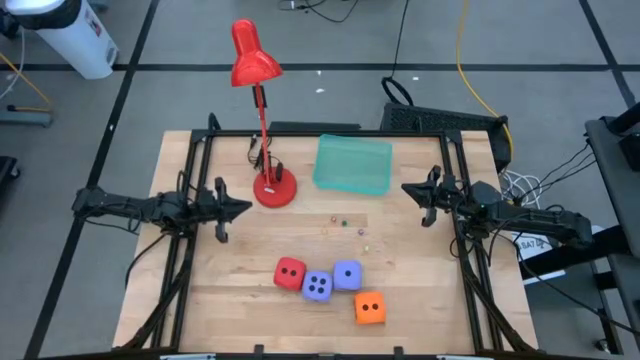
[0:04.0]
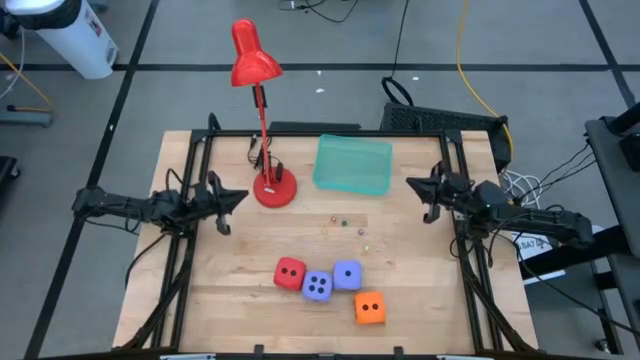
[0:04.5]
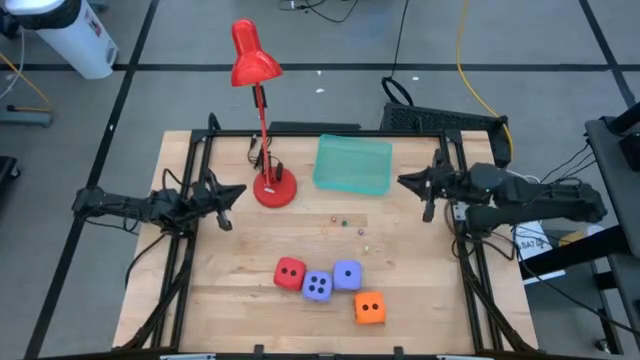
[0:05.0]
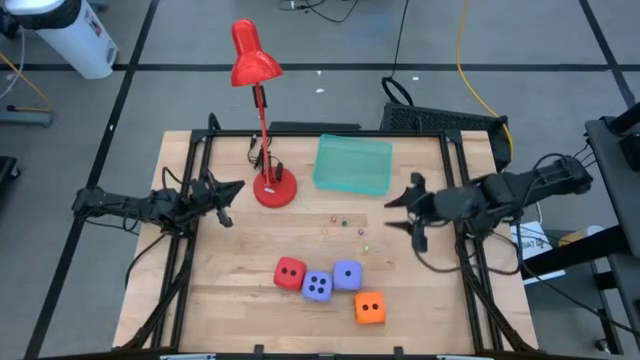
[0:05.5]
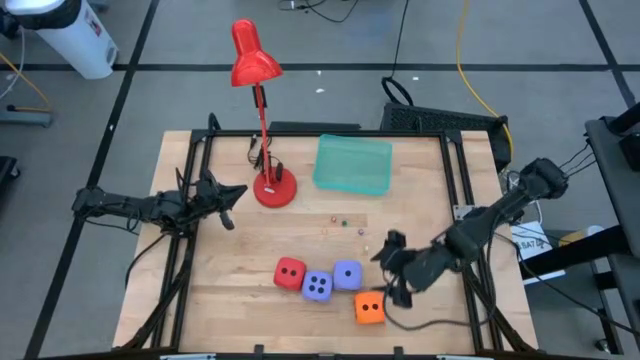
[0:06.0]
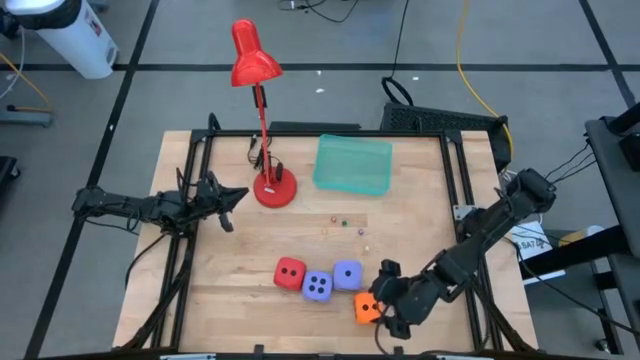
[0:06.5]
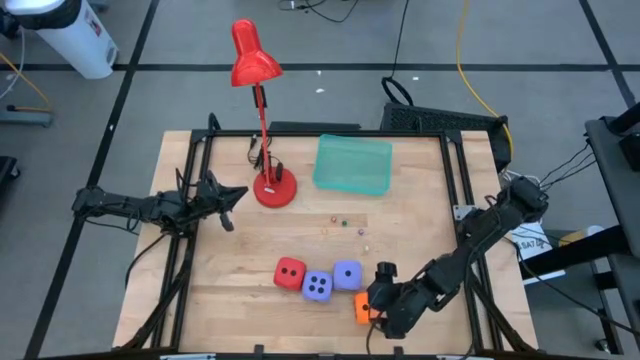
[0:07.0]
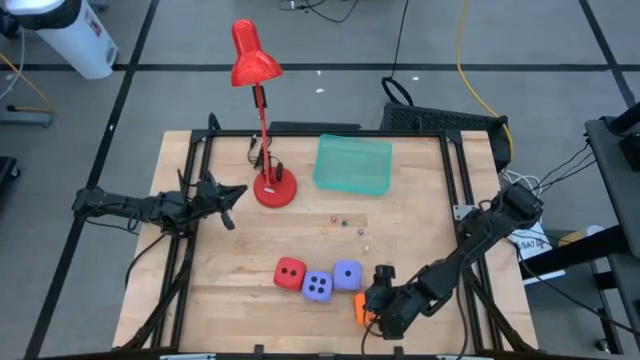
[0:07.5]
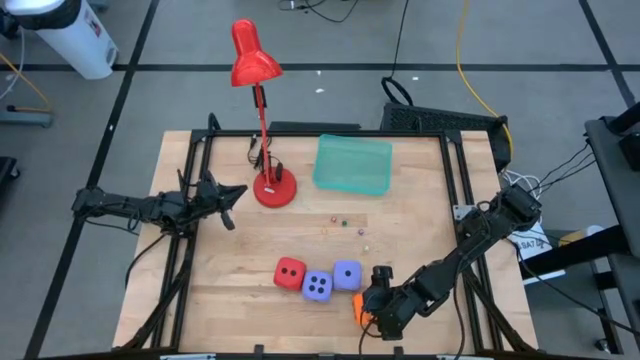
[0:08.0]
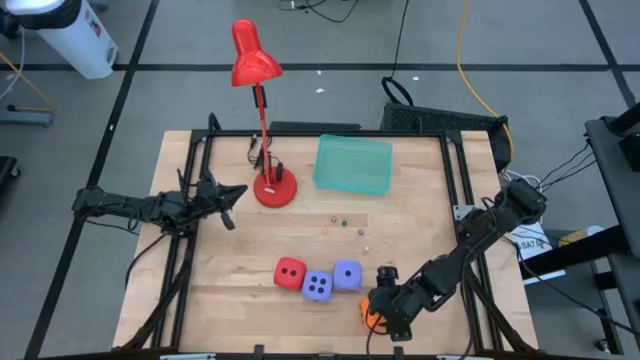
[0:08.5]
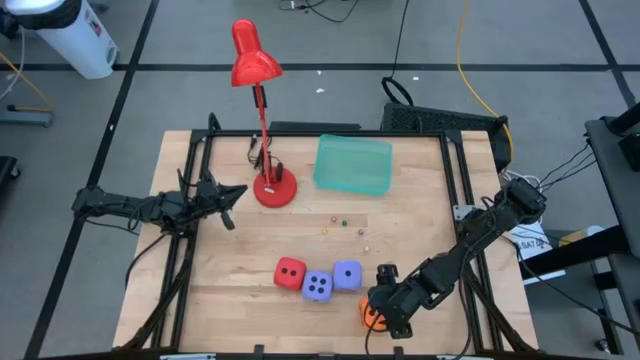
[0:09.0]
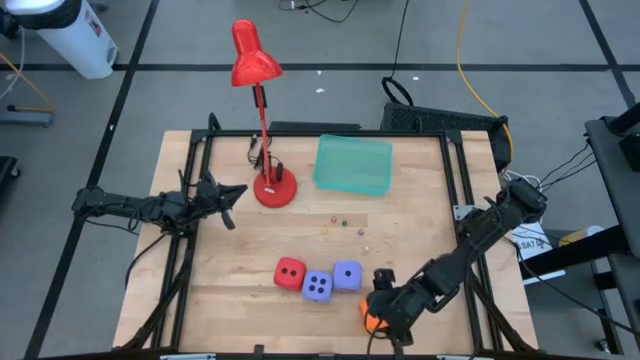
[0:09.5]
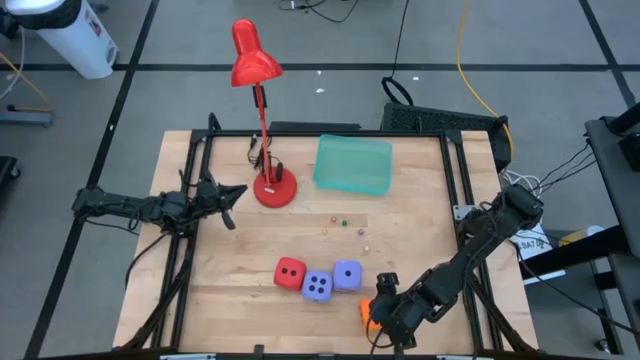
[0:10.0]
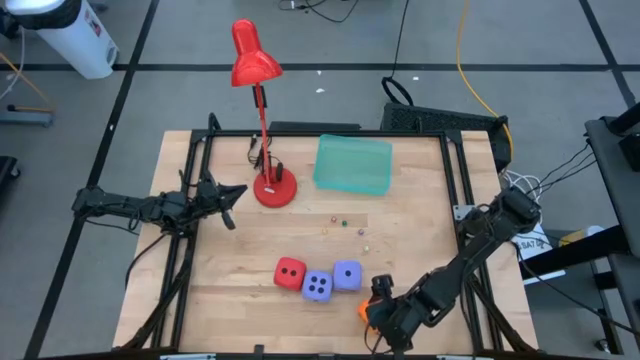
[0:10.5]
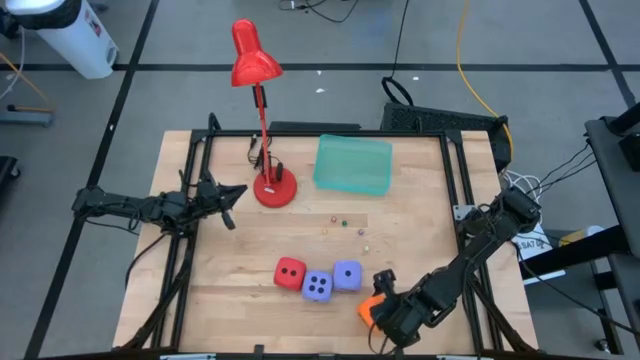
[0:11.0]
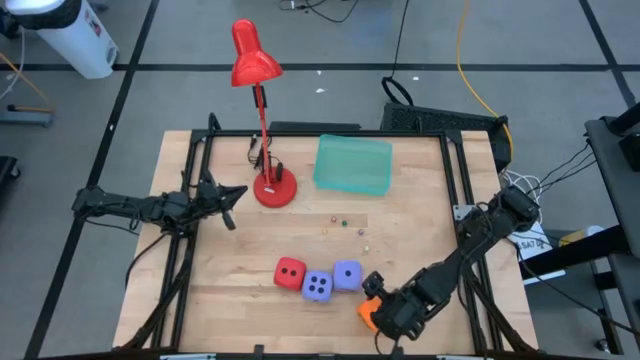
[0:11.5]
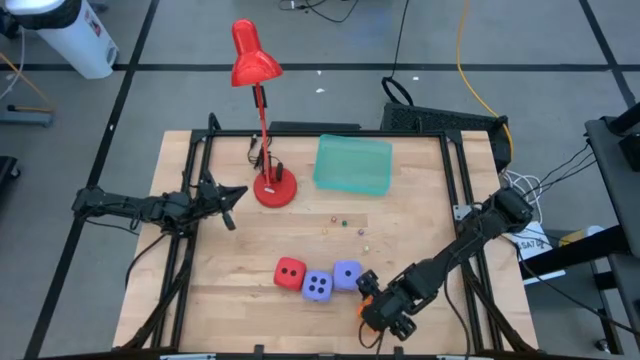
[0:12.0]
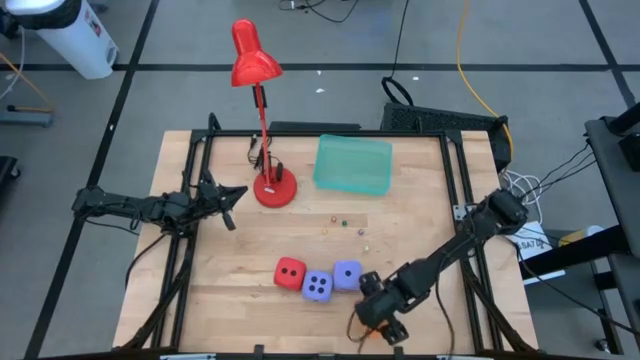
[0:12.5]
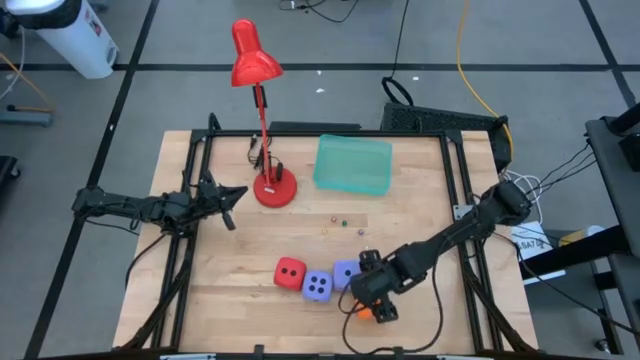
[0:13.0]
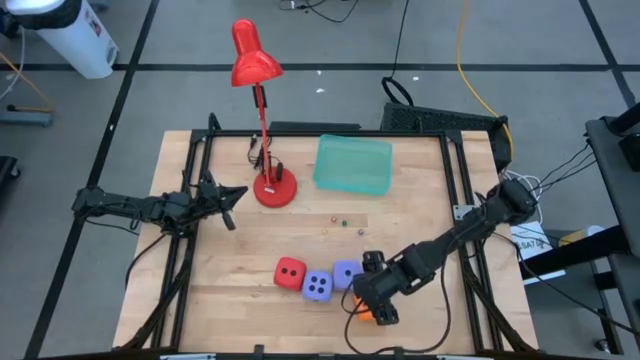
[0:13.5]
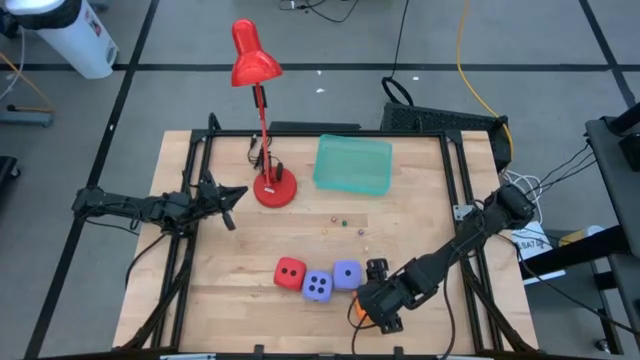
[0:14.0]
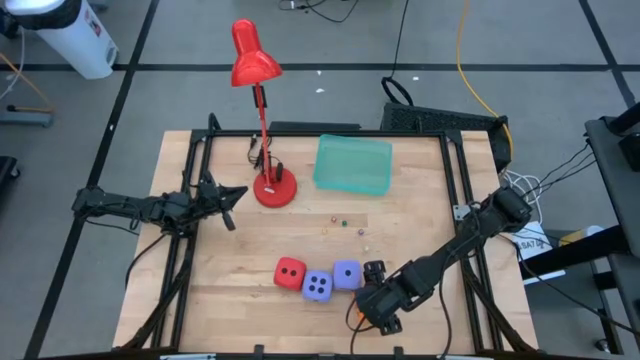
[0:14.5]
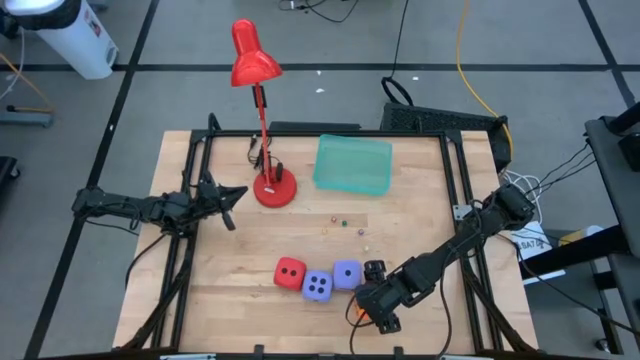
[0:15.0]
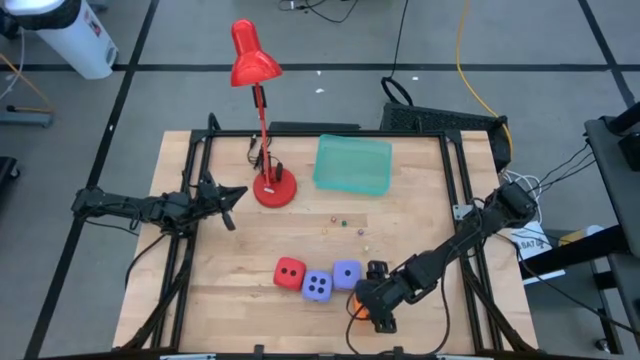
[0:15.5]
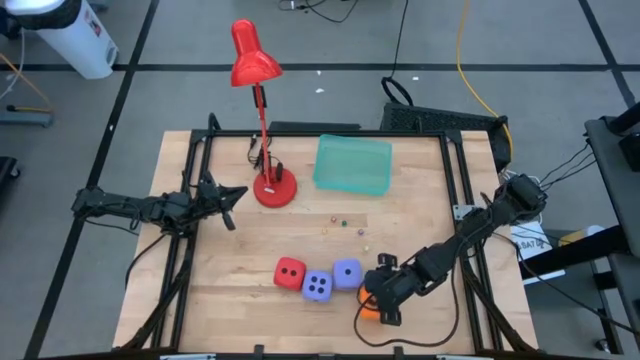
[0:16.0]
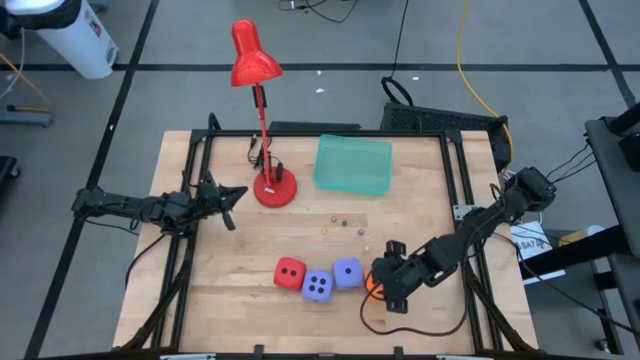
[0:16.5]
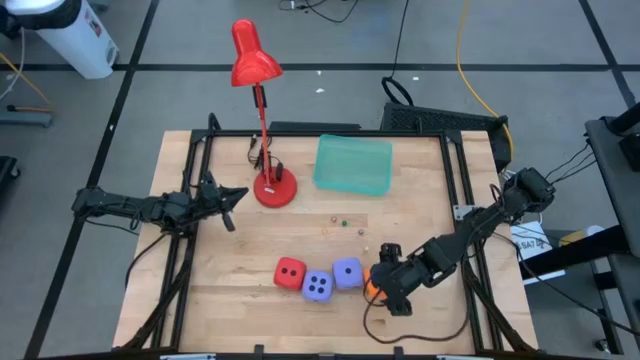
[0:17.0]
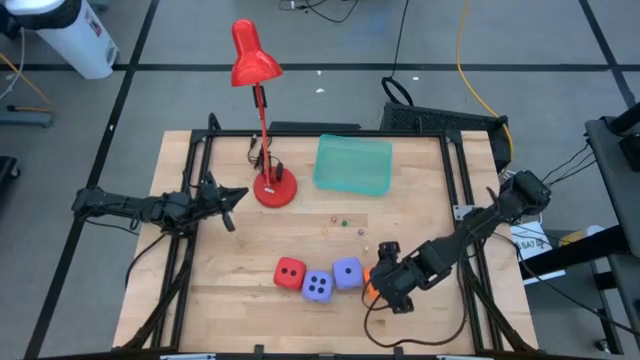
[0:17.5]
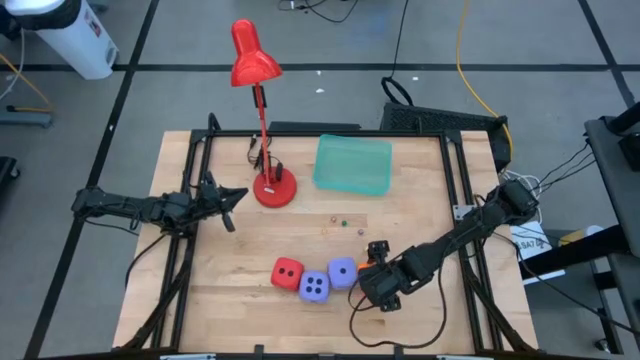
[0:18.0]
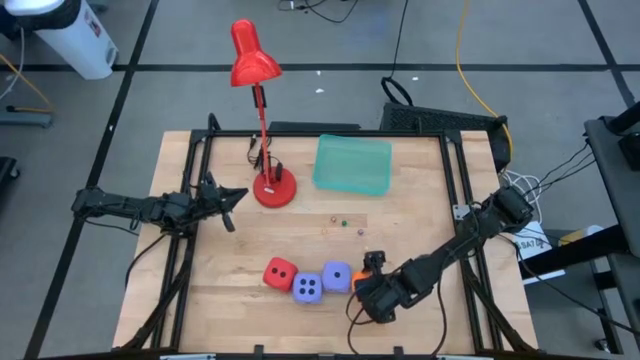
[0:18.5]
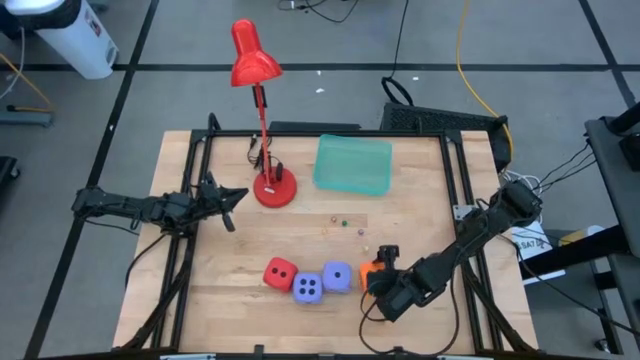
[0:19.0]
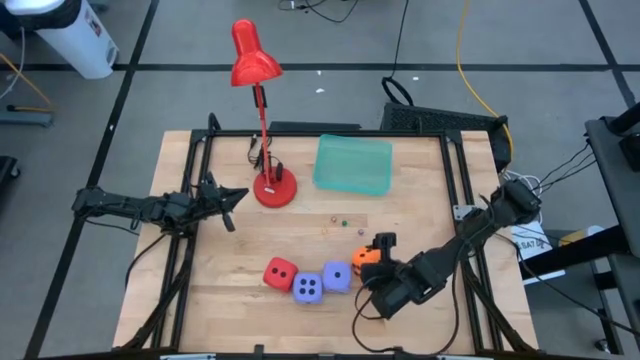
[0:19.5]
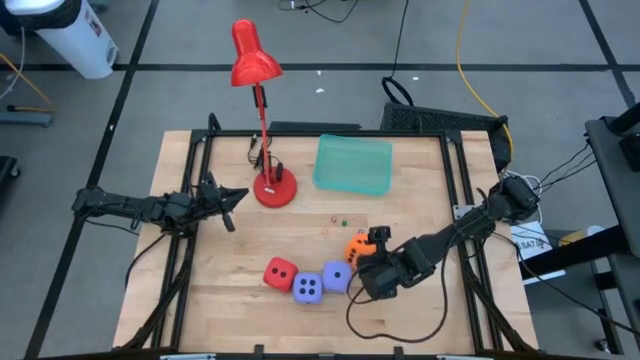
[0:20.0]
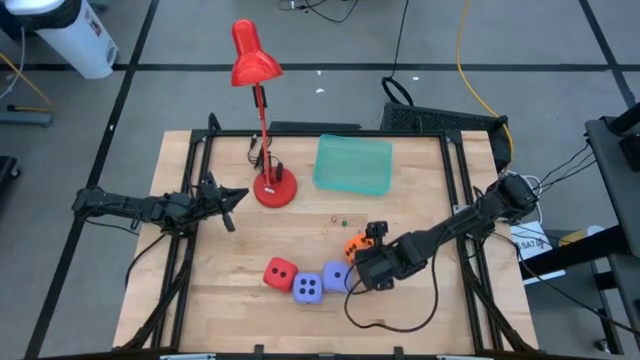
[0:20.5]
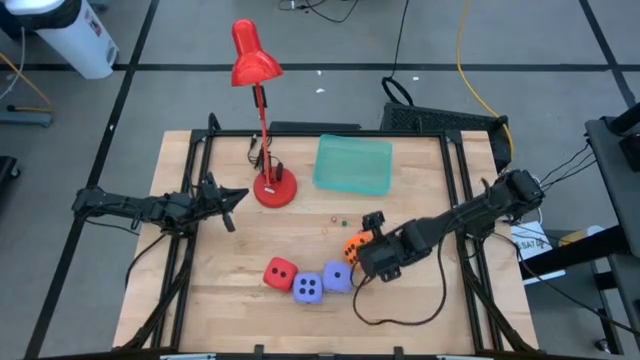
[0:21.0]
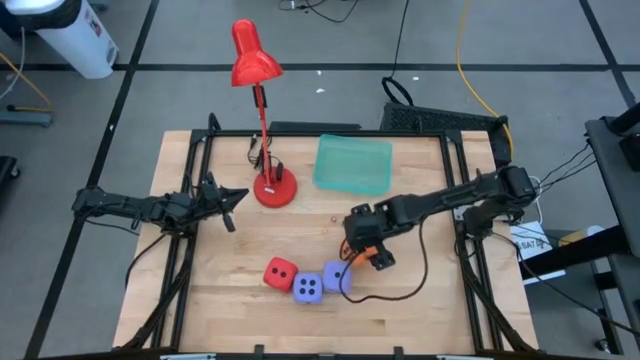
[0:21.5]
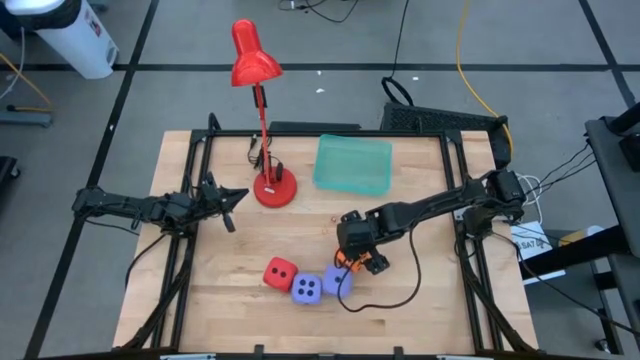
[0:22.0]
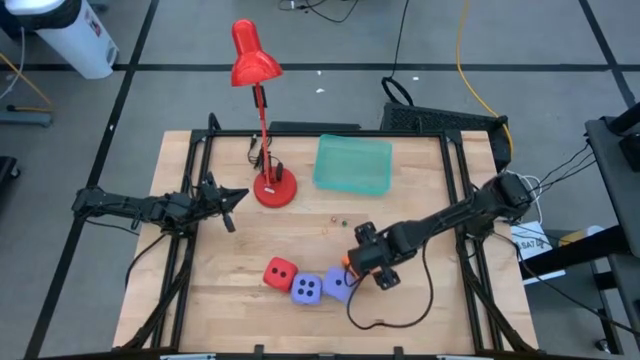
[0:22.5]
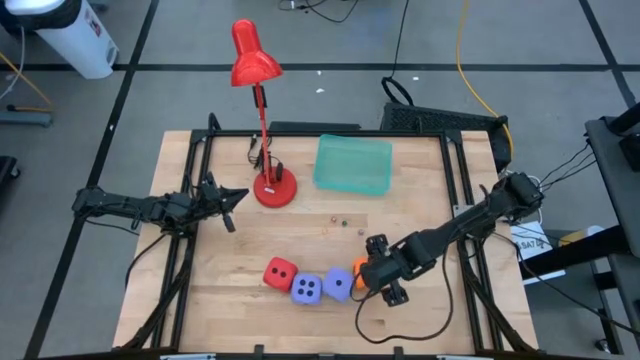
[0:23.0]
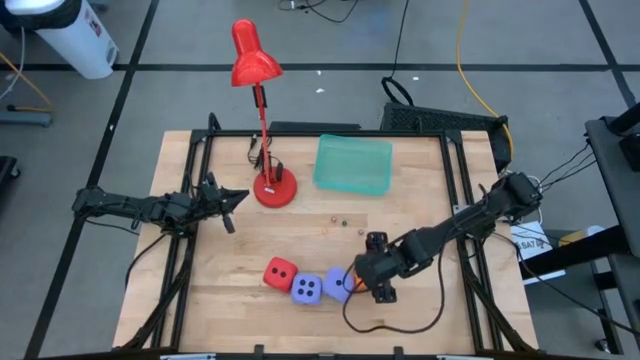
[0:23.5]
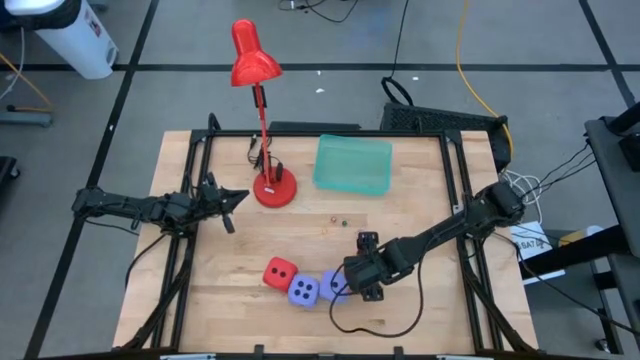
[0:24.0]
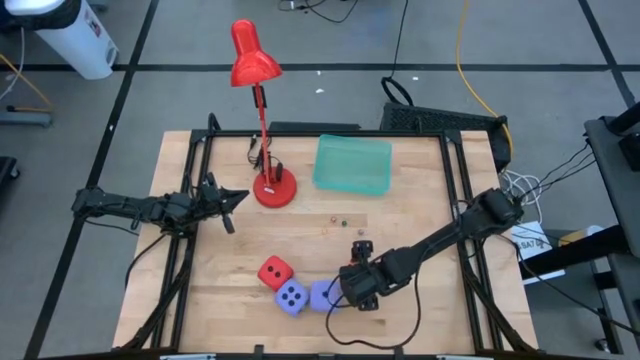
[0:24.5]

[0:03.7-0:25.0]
Task: Pick & Place Dice
Put the big orange dice into the green bin
